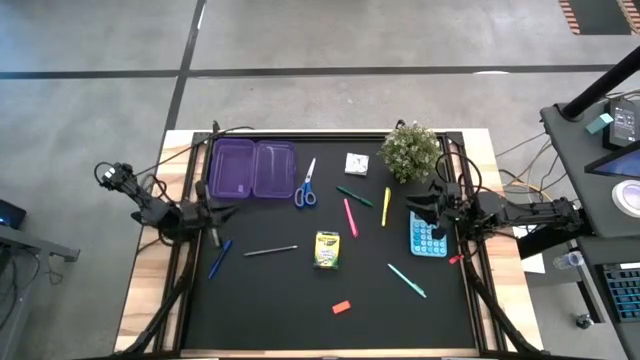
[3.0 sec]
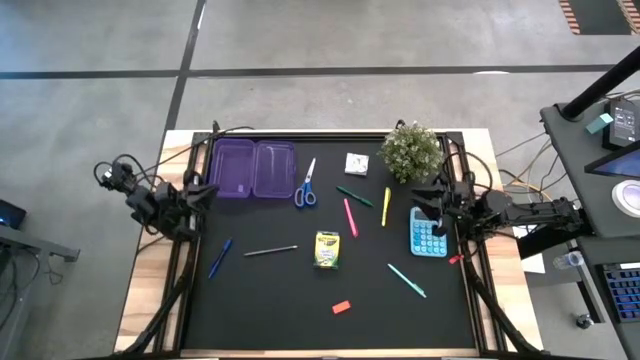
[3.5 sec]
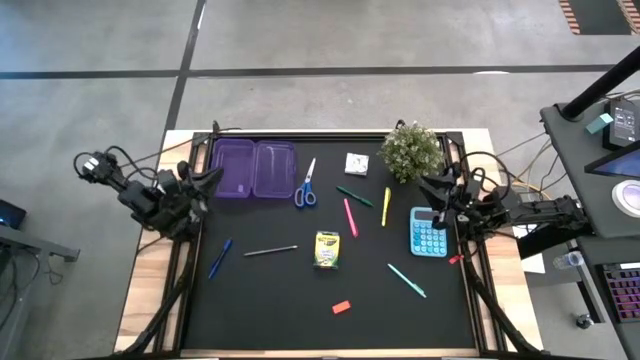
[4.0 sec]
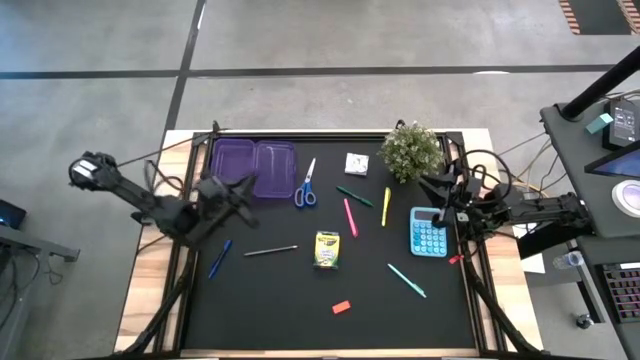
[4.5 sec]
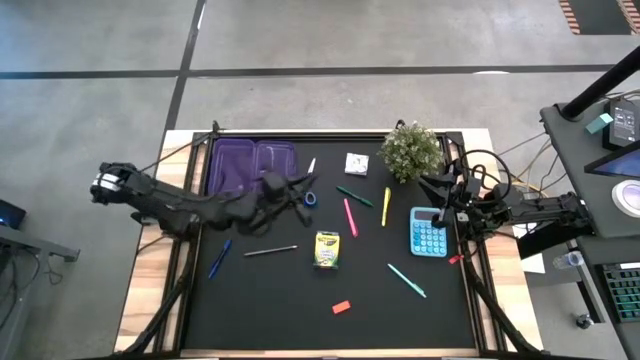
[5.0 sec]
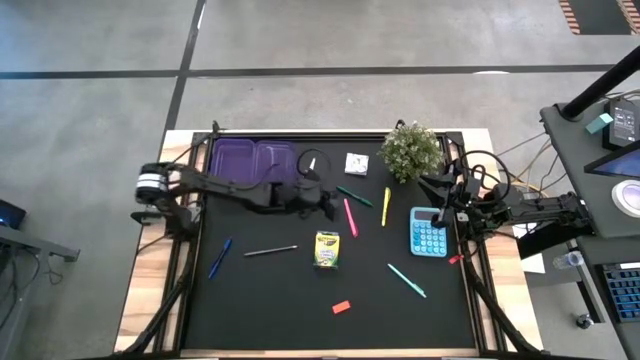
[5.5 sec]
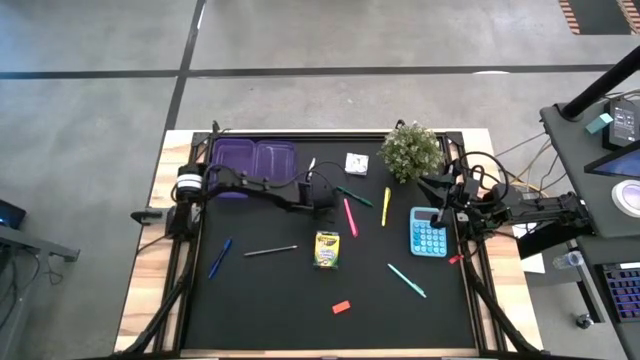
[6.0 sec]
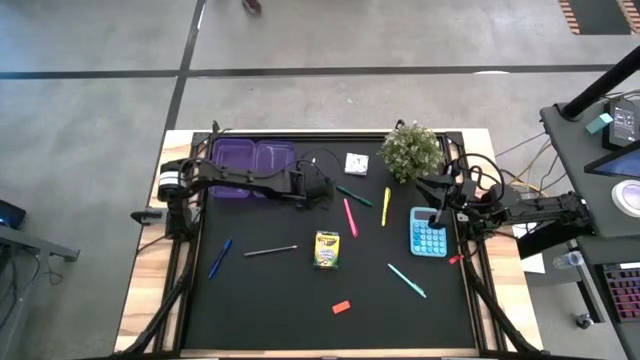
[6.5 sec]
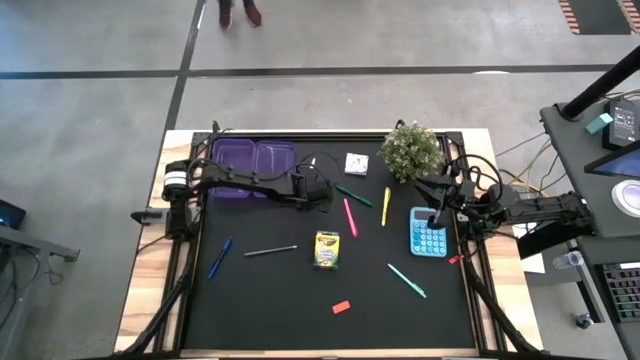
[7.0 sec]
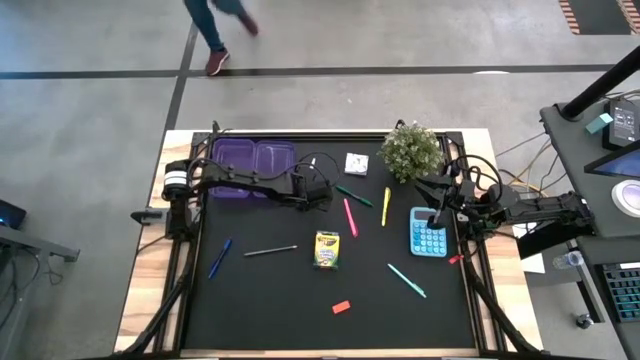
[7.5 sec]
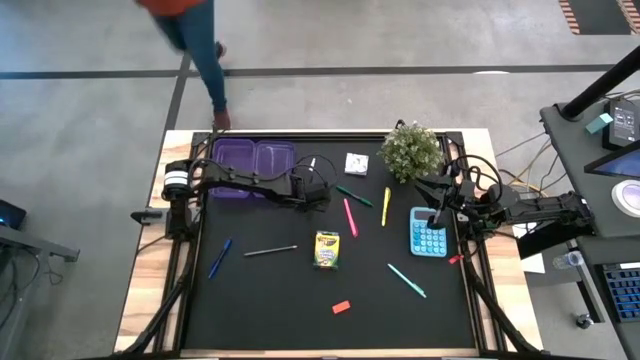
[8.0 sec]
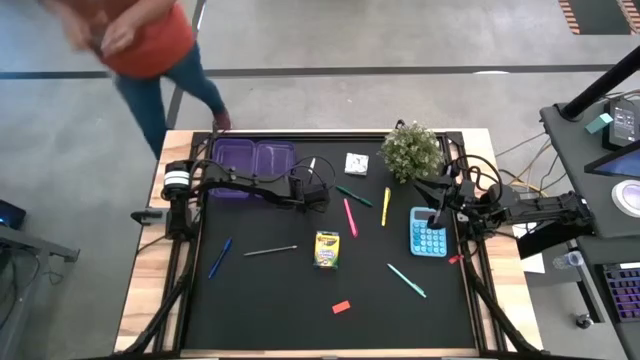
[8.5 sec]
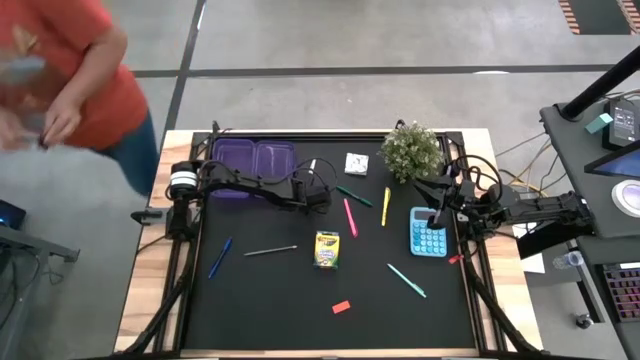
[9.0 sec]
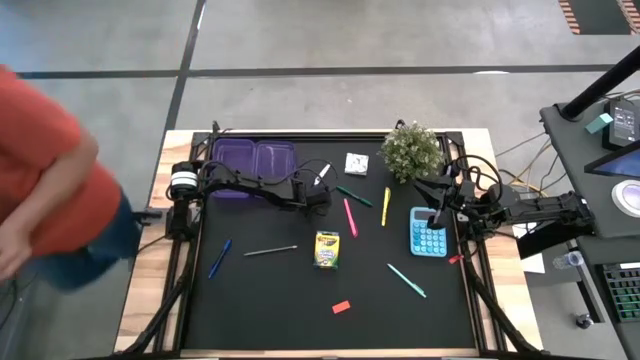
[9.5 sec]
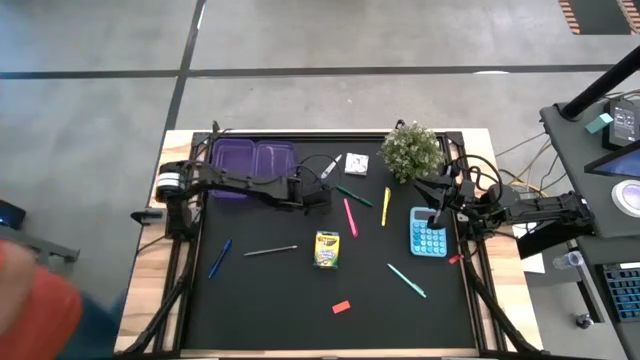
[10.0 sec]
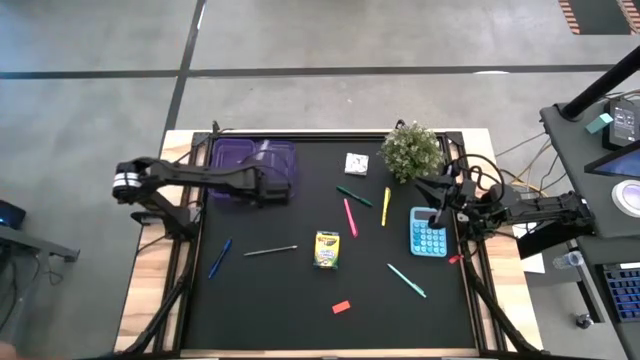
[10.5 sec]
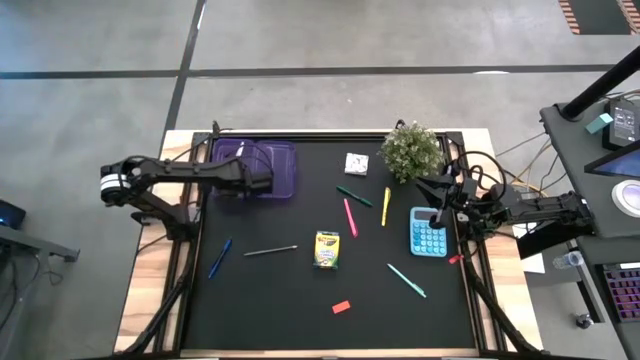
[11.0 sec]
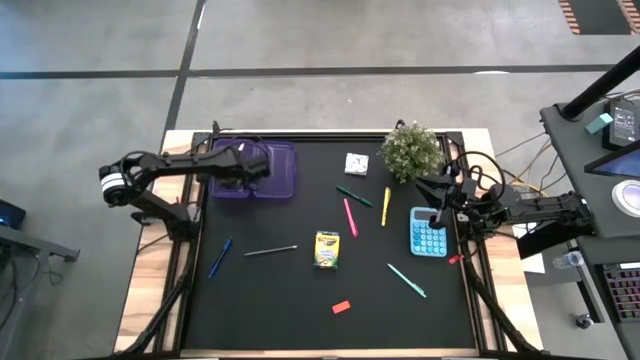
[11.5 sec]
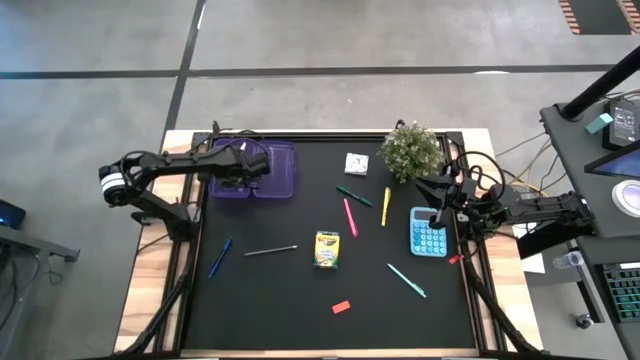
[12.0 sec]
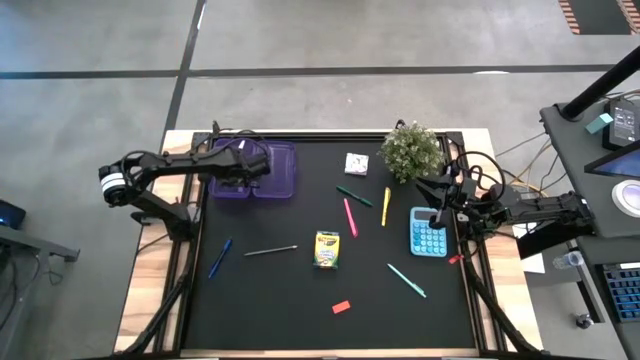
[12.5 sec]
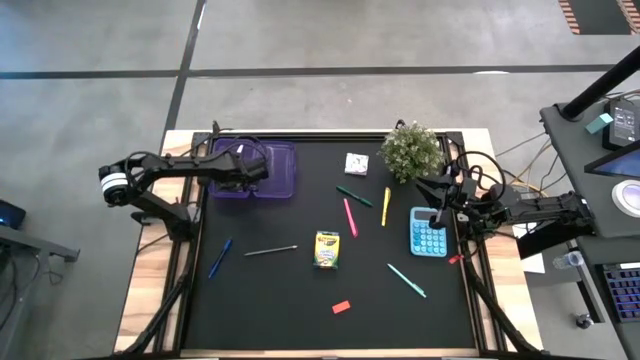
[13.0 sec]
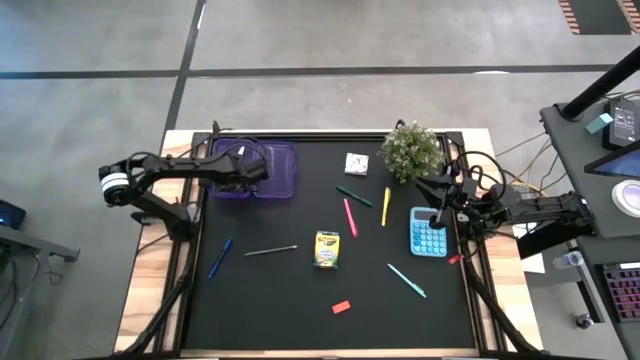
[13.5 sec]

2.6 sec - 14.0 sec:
Task: Pack school essentials
Put the blue scissor into the purple supply box

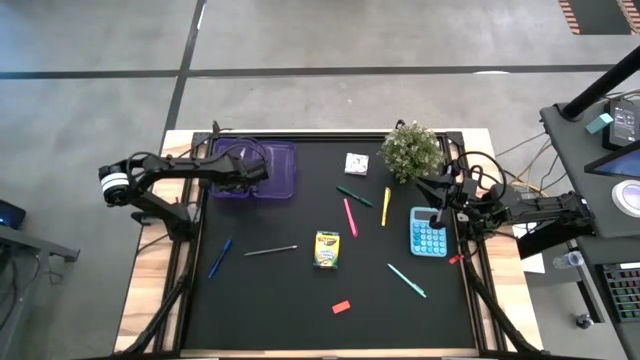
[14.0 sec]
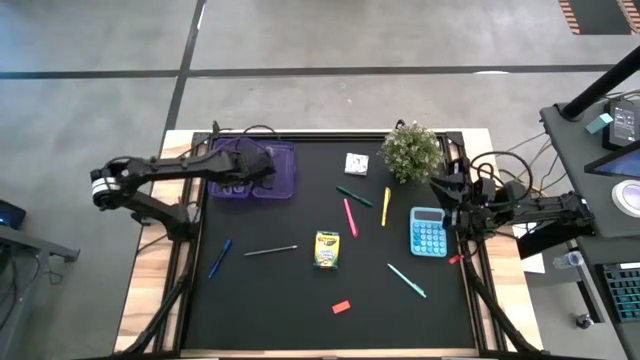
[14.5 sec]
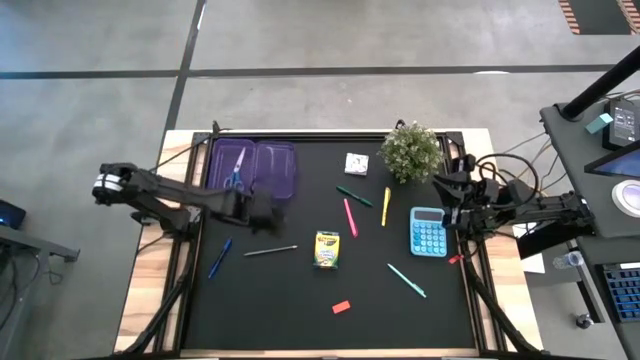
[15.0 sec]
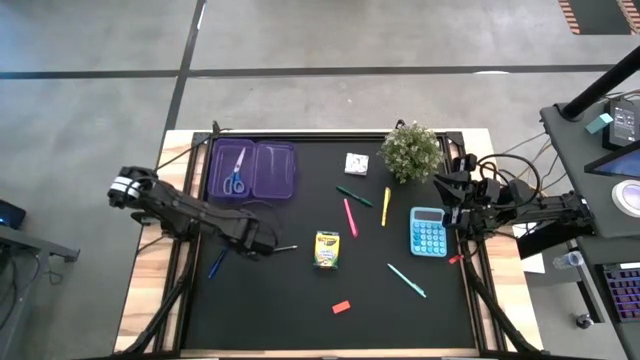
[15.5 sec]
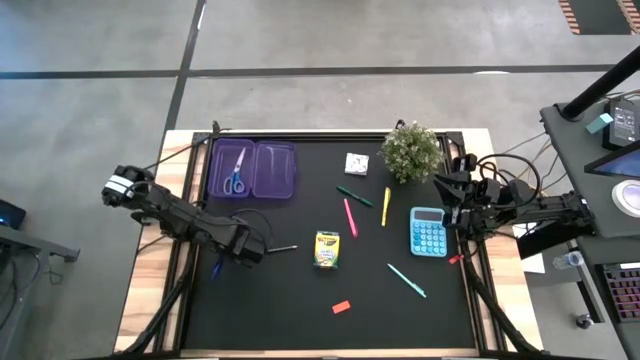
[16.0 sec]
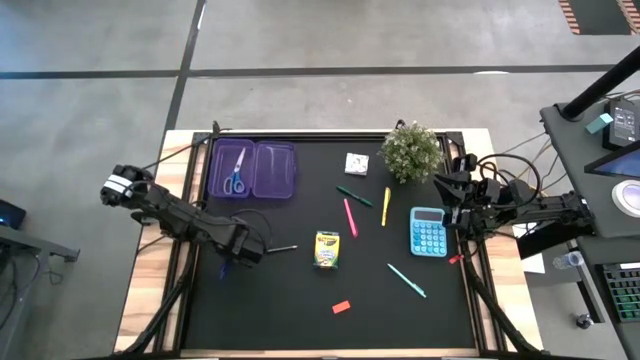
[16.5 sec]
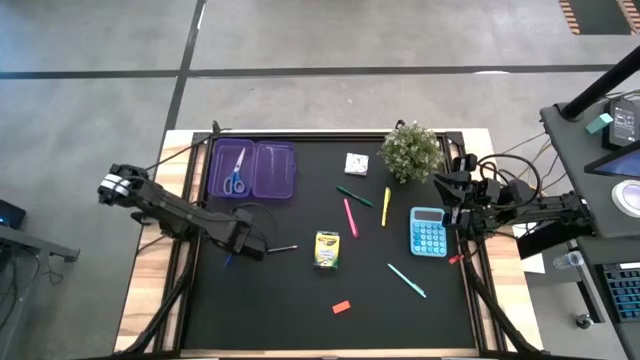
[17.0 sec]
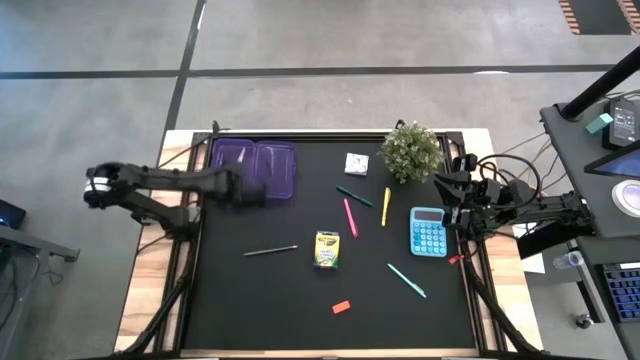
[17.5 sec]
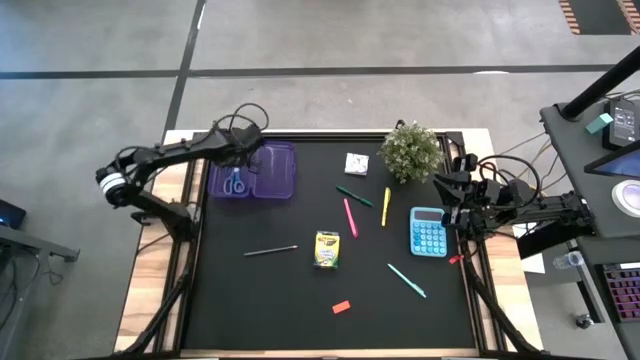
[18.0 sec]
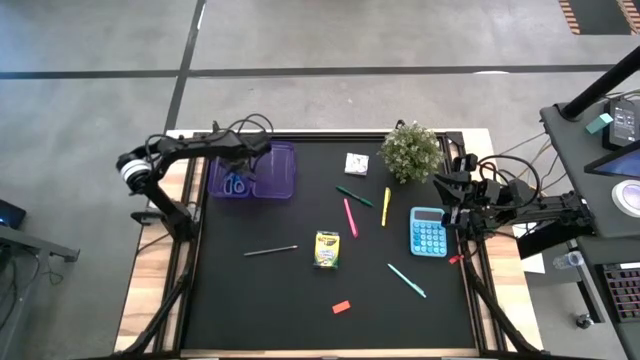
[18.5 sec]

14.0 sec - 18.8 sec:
Put the blue pen into the purple supply box

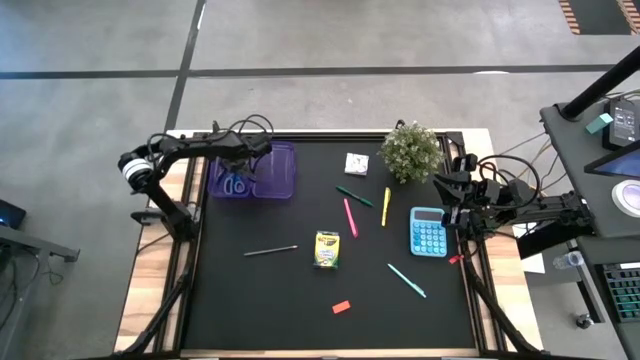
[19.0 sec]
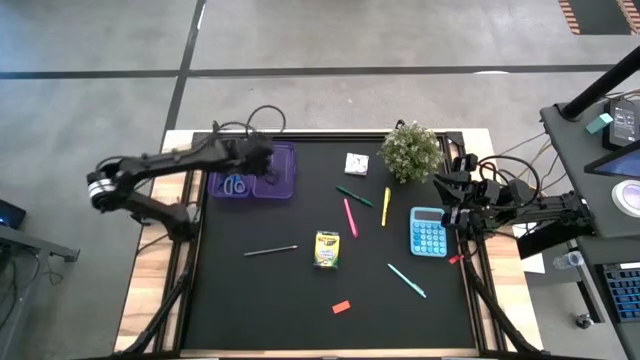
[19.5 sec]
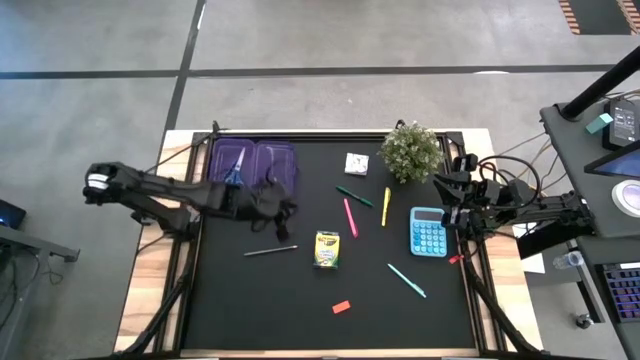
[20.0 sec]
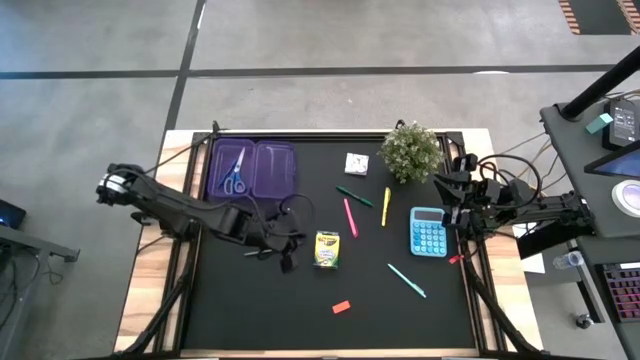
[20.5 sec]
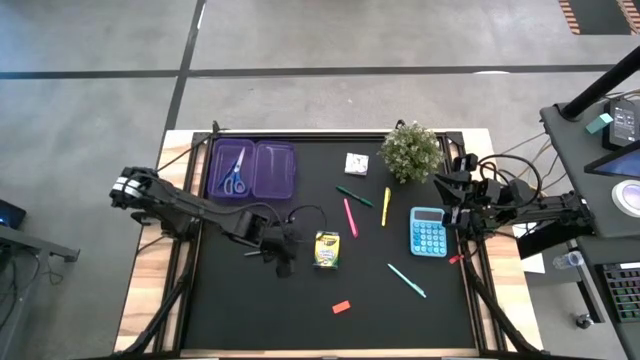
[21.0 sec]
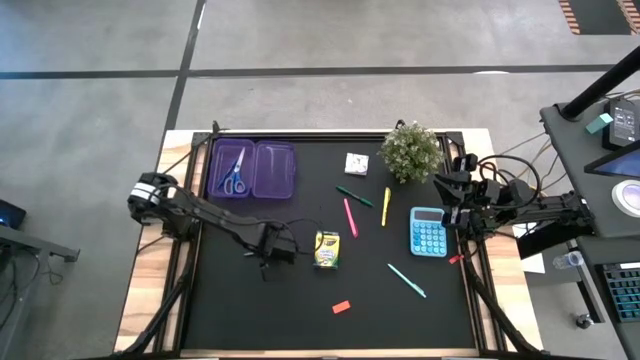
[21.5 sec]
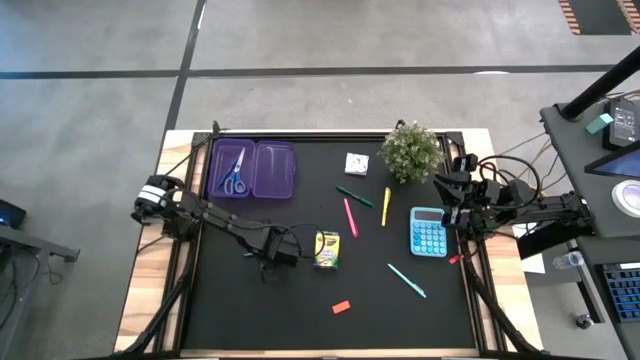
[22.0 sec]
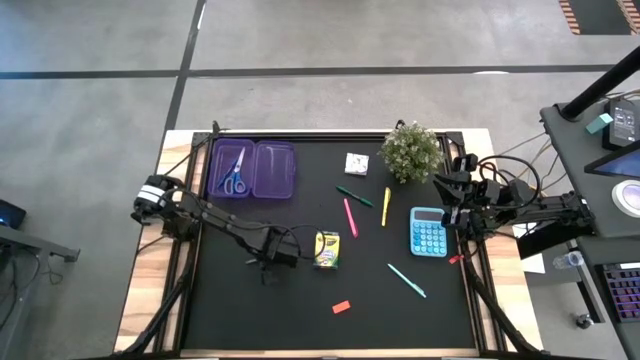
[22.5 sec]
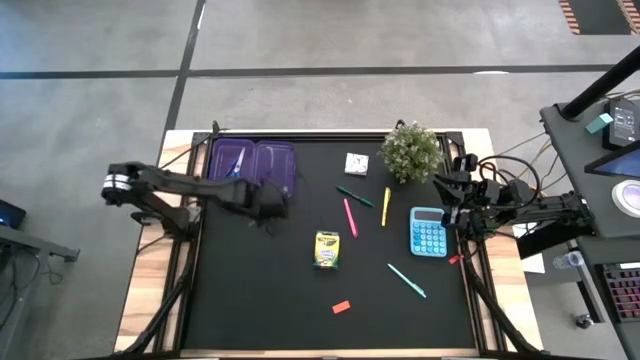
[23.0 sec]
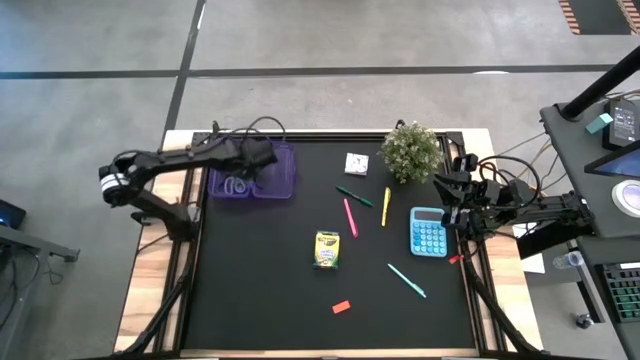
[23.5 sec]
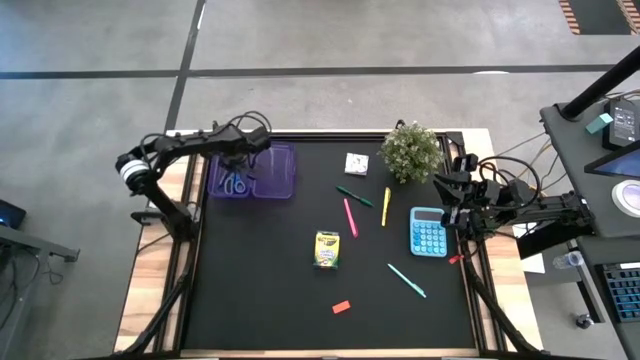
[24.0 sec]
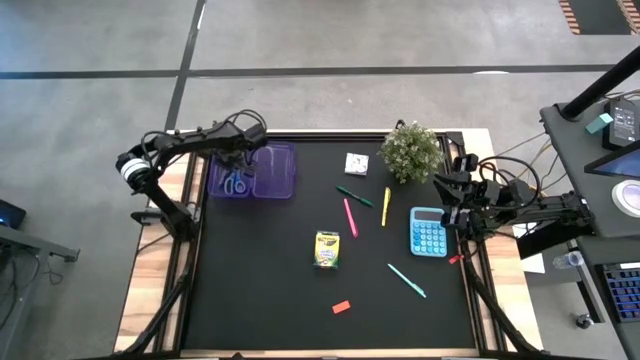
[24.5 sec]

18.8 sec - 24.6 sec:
Put the black pencil into the purple supply box
